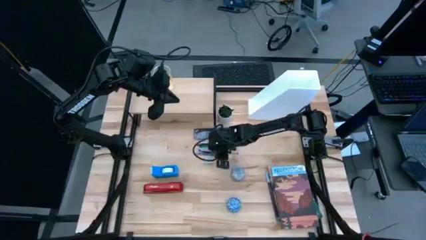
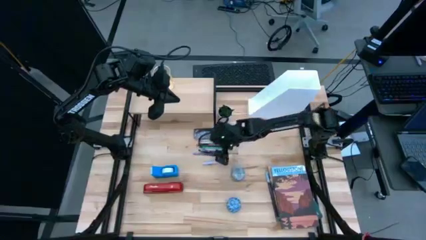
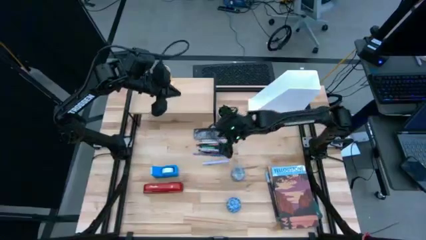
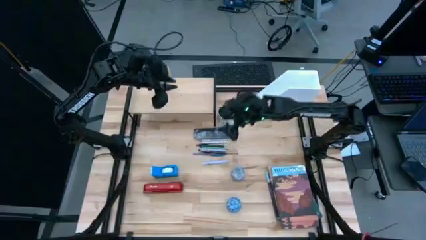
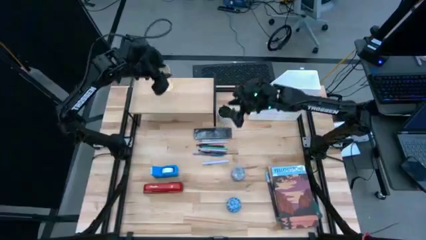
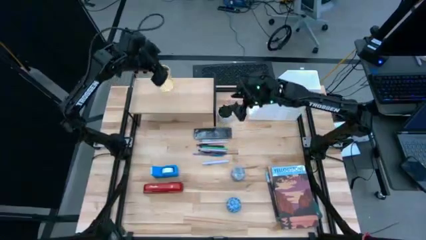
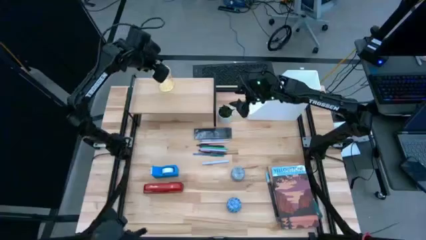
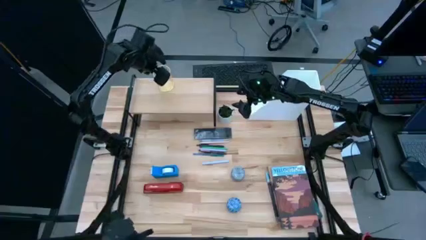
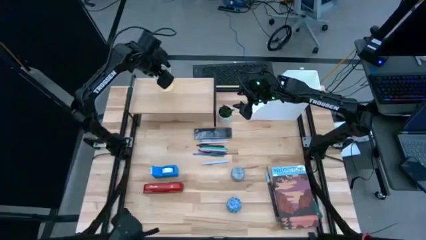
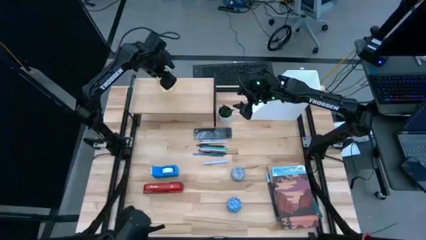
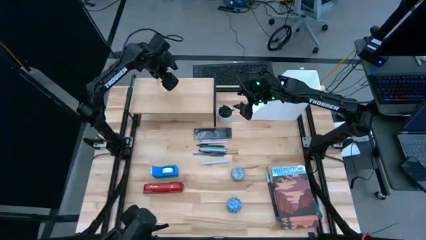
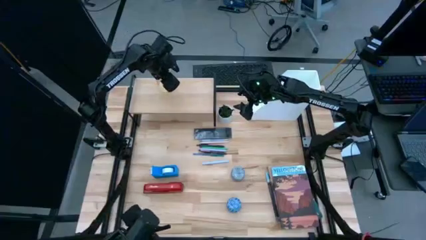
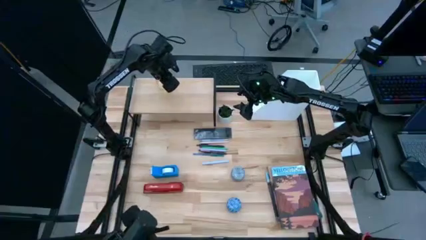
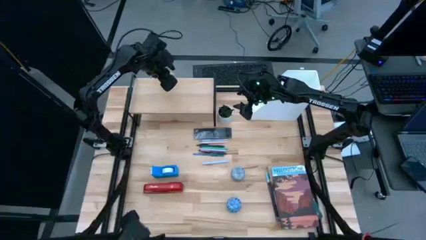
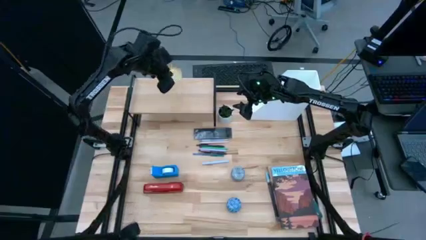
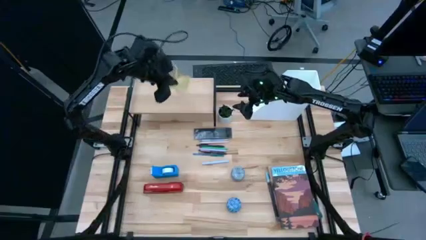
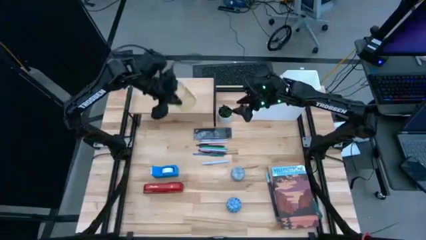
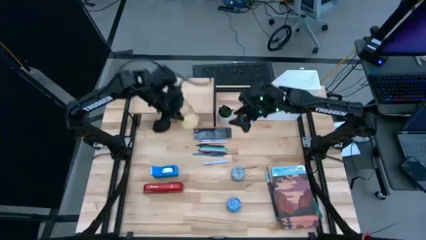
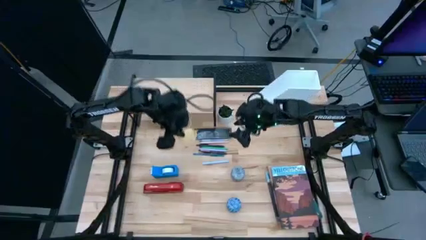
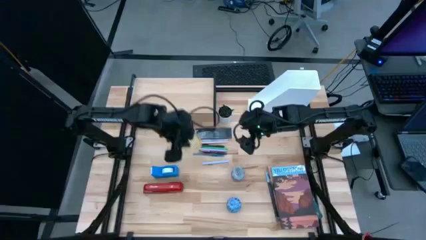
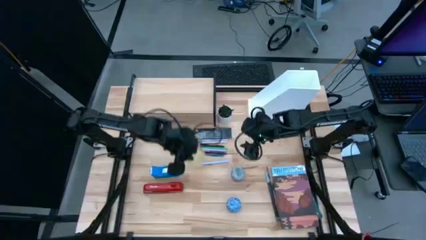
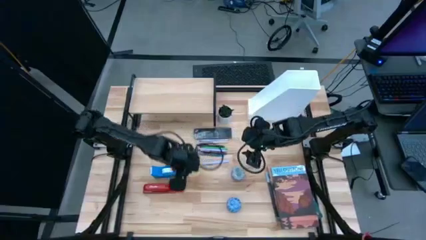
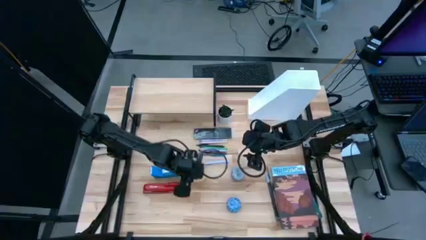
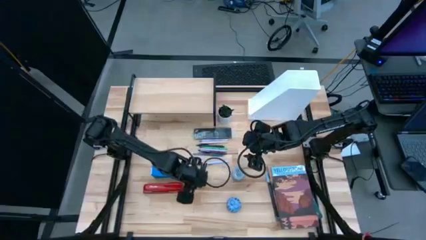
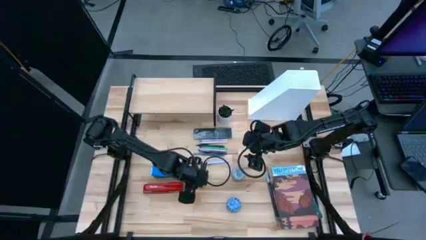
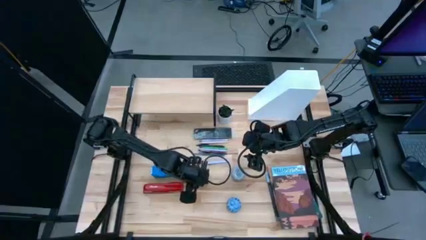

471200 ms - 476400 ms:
Task: Stock shelves
Remove the gold pen holder from the shelf

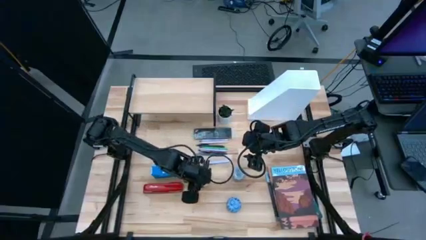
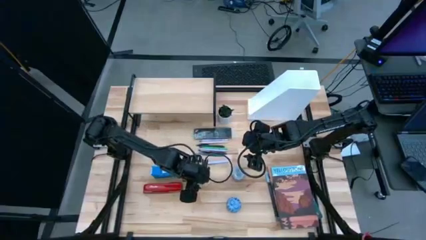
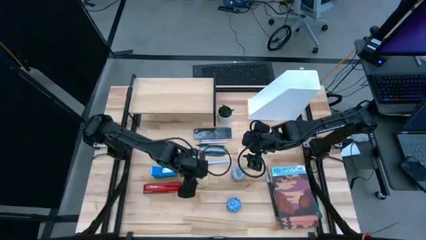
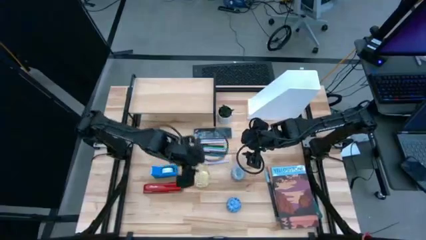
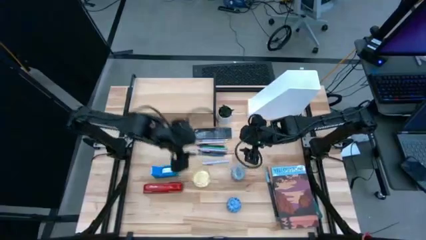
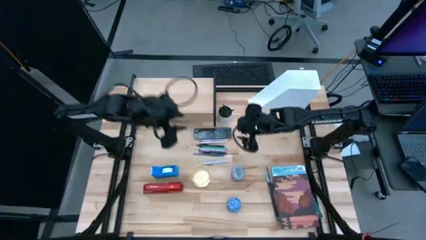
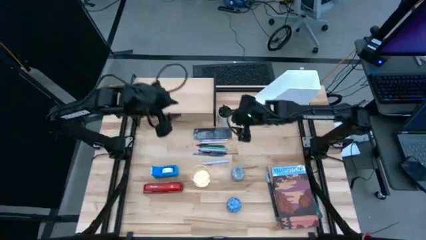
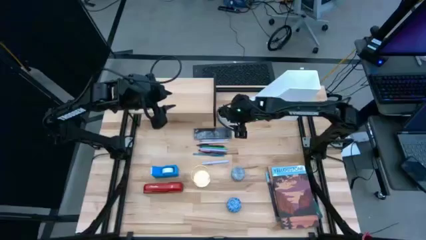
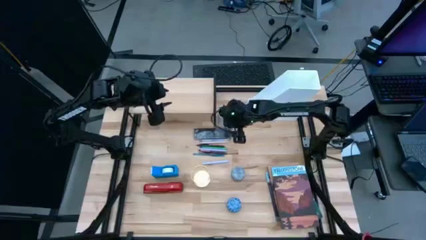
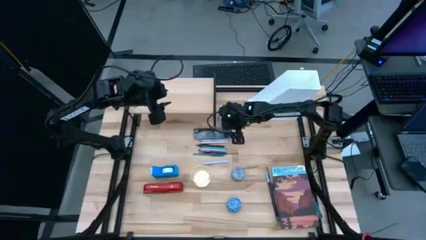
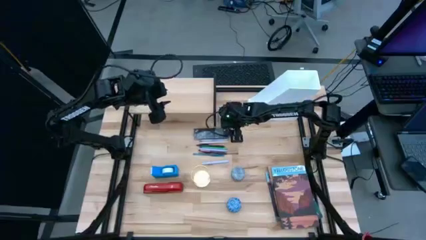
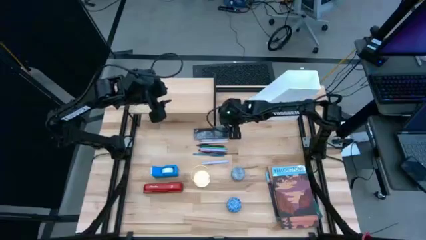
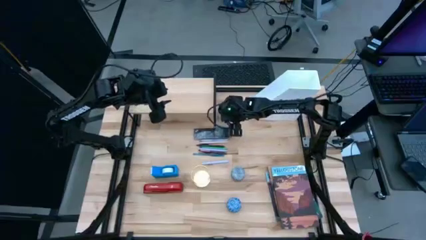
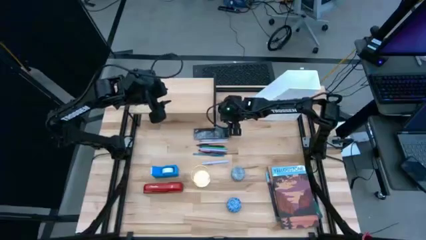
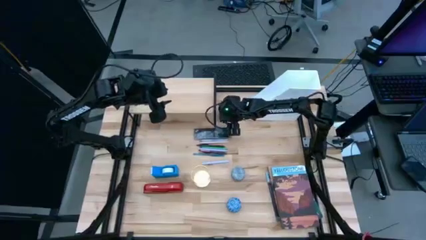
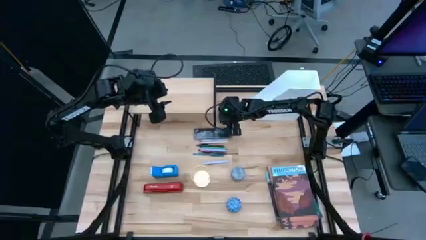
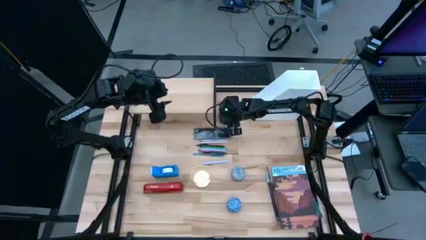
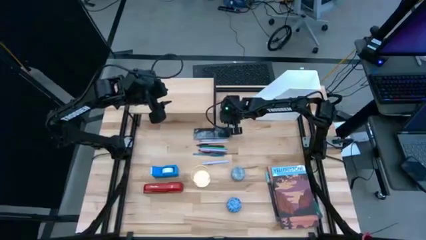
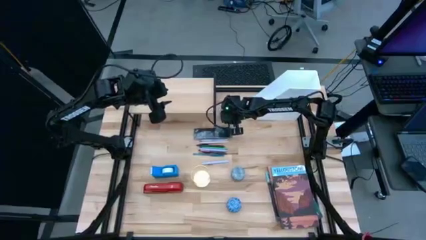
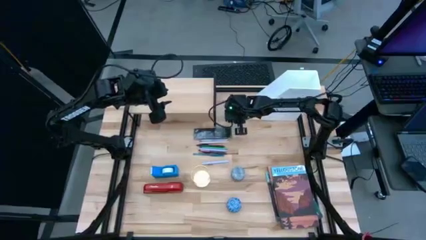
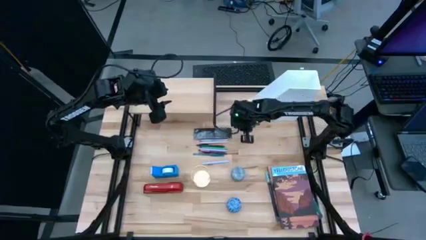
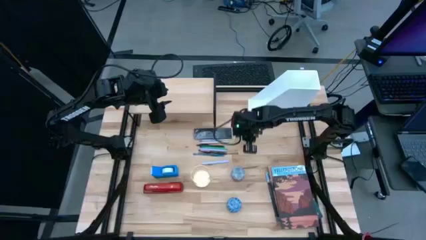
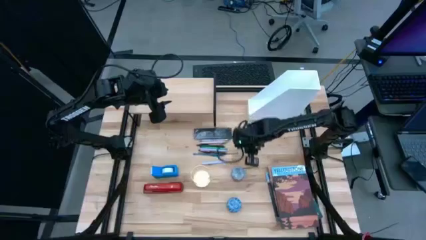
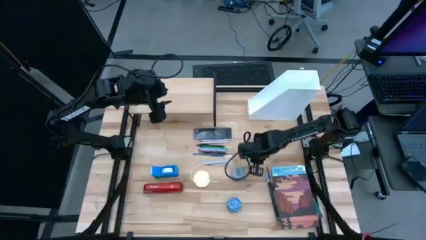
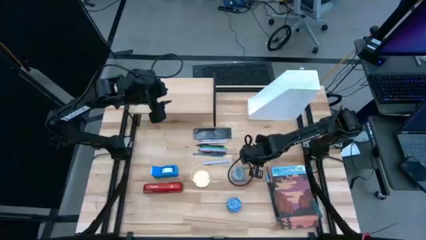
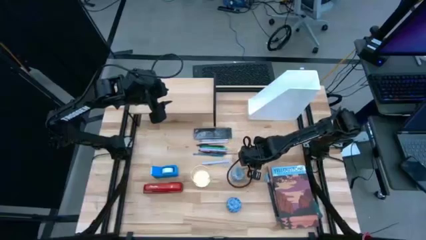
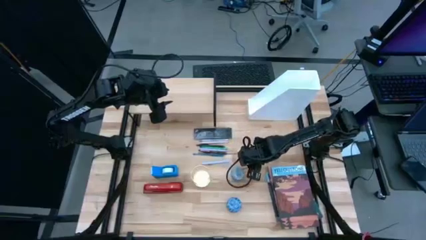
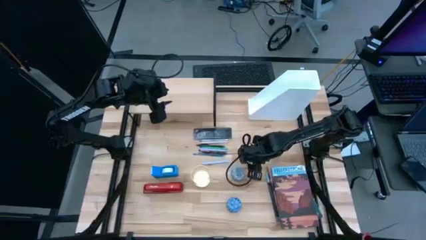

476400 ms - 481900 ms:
Remove the white flower pot from the right side of the shelf

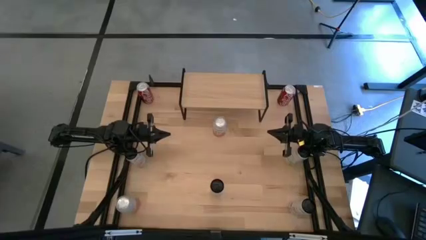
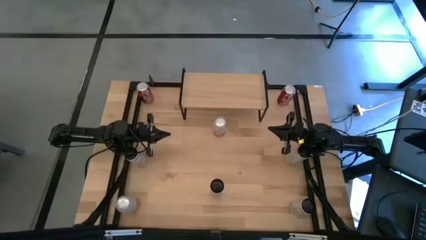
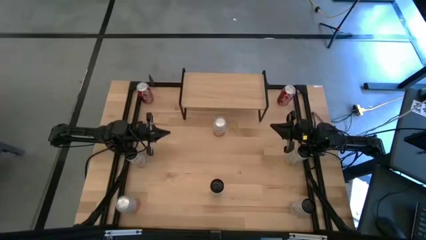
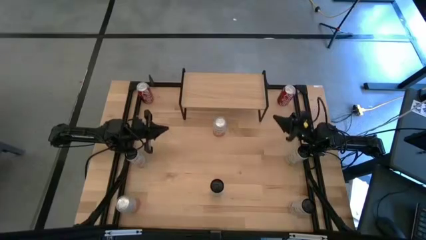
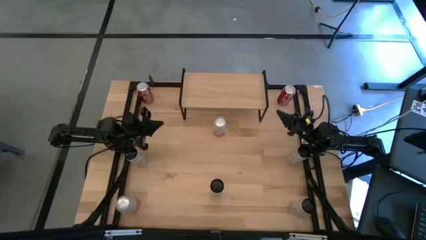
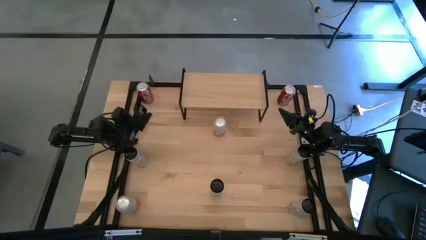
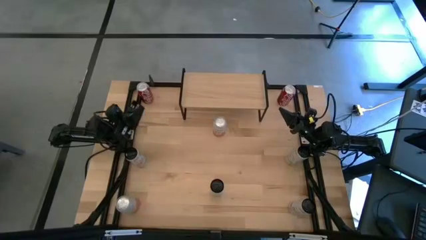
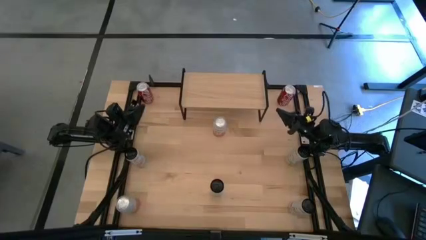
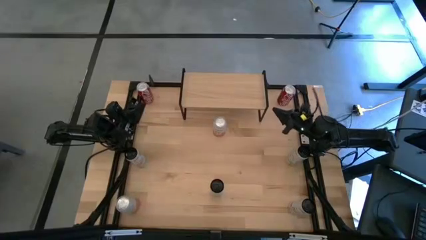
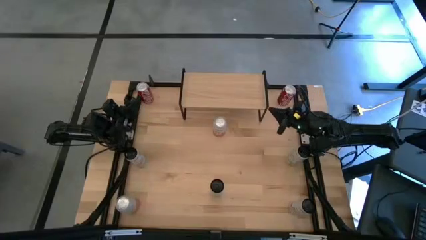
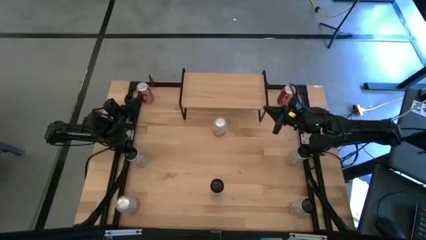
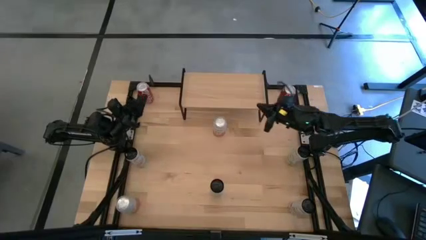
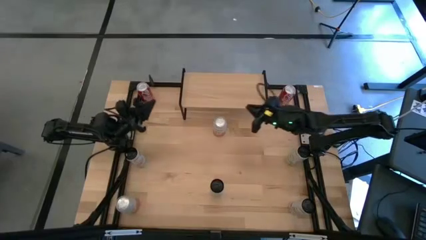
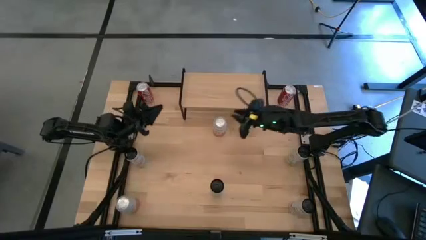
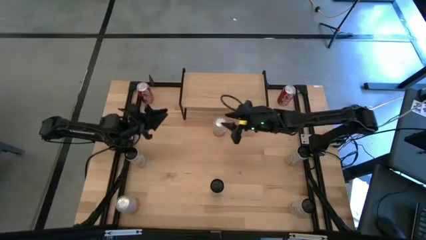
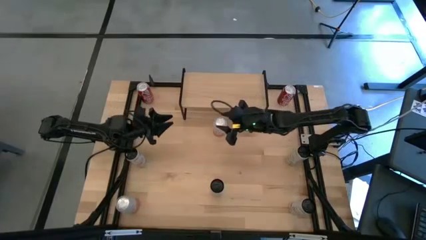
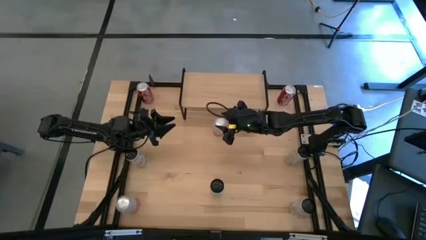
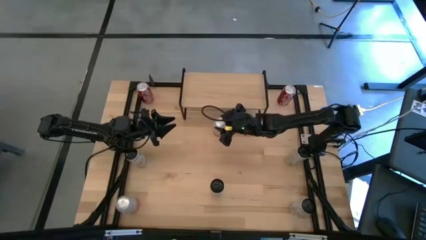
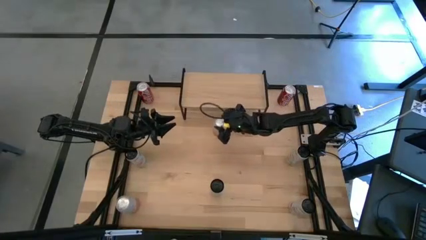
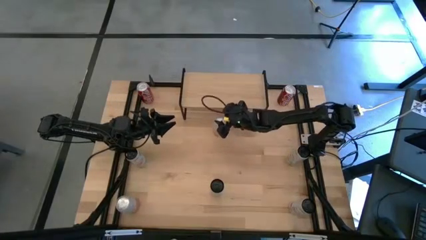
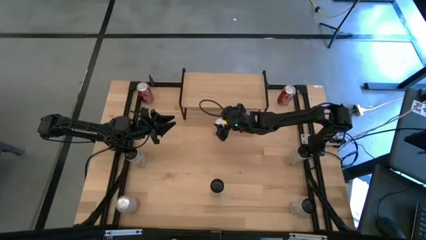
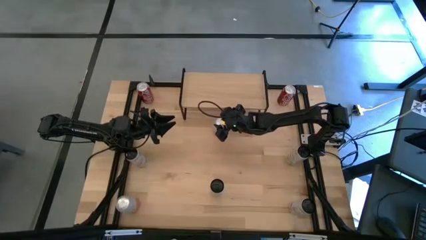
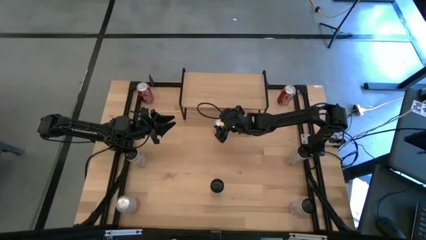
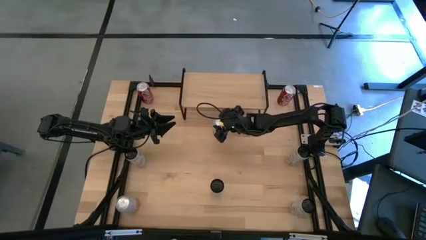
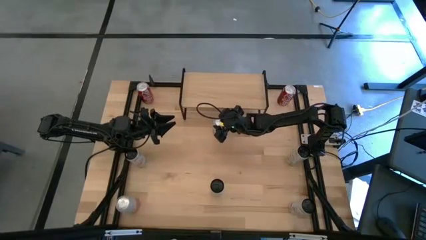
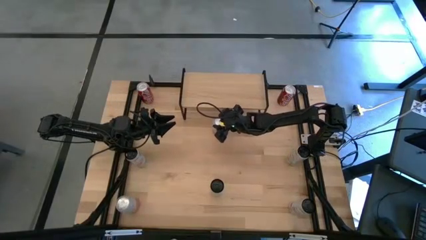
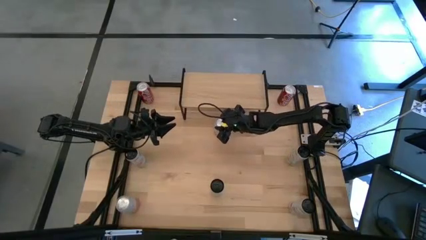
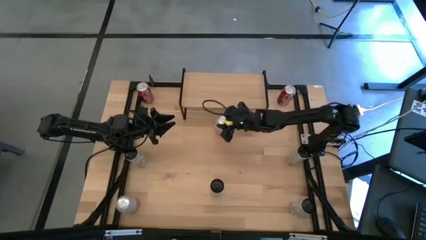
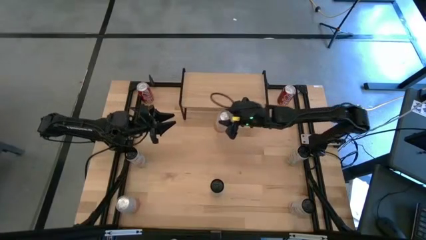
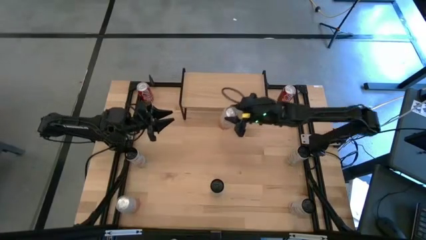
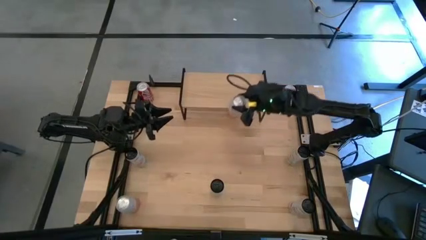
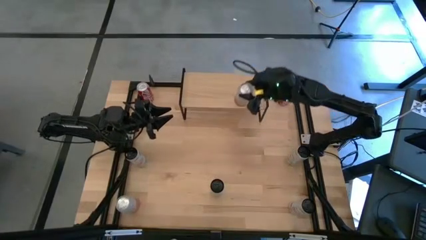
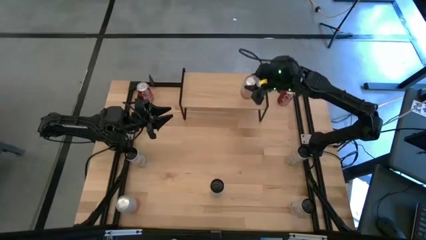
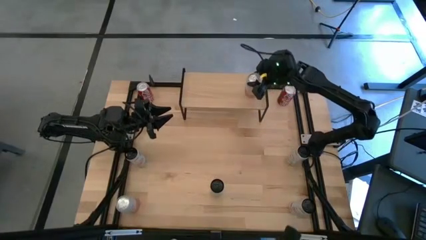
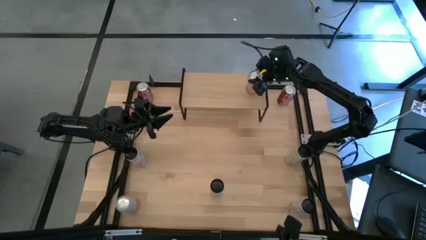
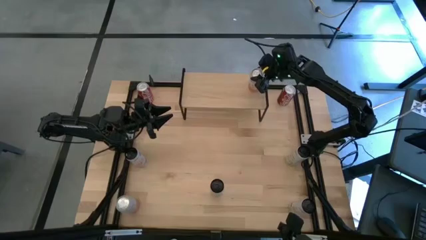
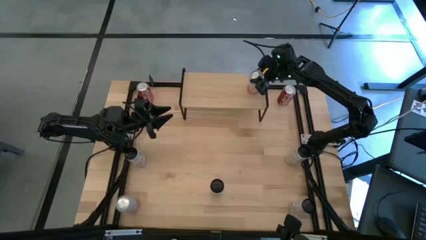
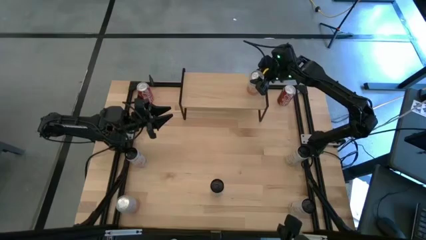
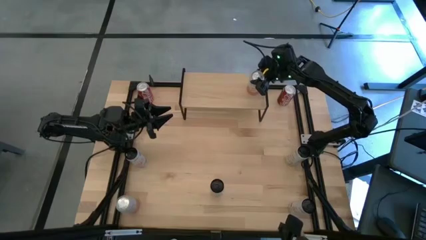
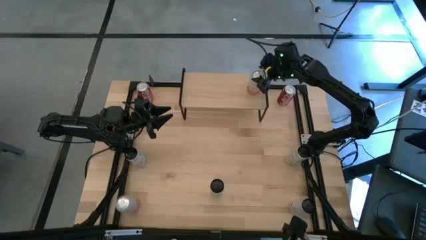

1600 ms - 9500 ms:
Task: Place canned beverage on shelf
Put the top white and pink soda can on the shelf
